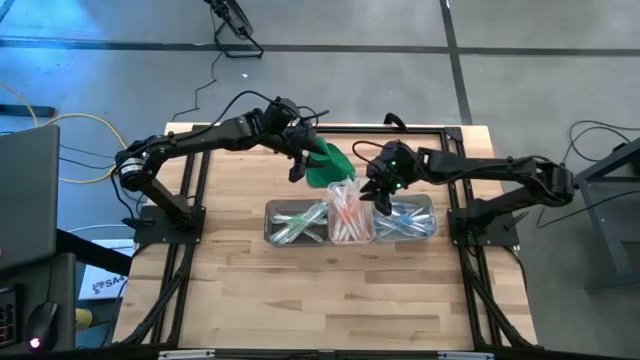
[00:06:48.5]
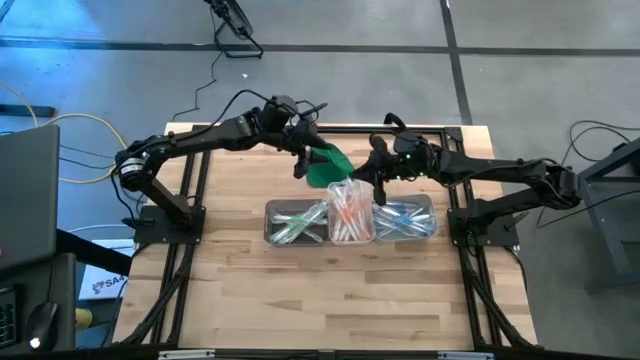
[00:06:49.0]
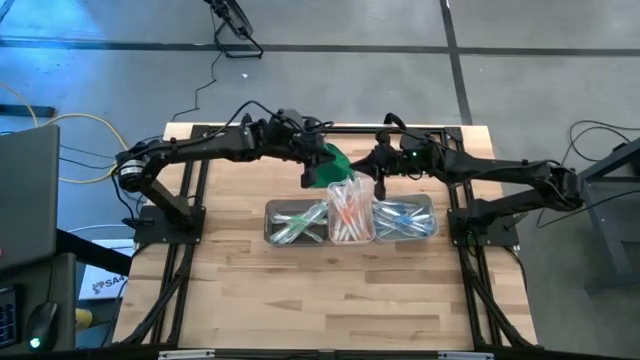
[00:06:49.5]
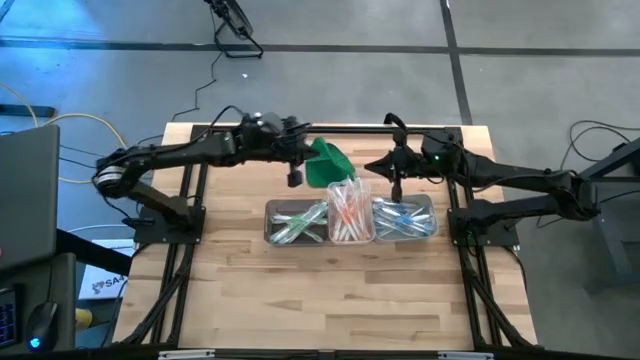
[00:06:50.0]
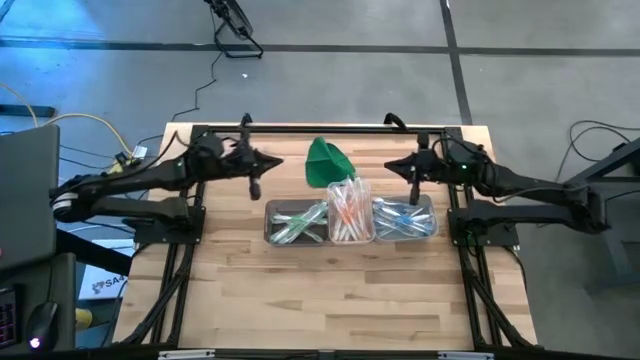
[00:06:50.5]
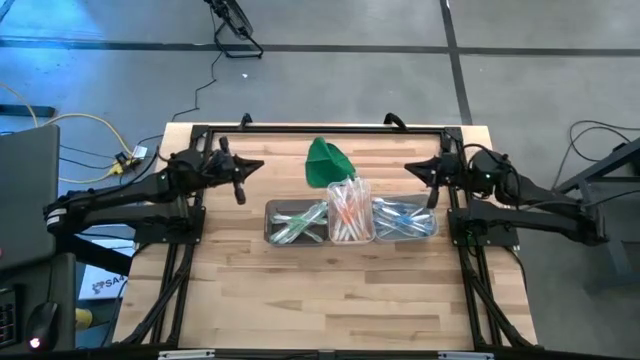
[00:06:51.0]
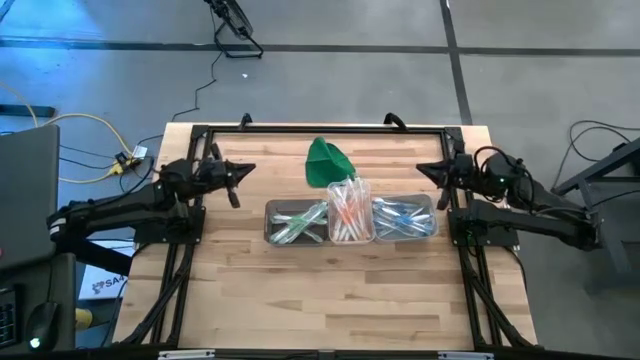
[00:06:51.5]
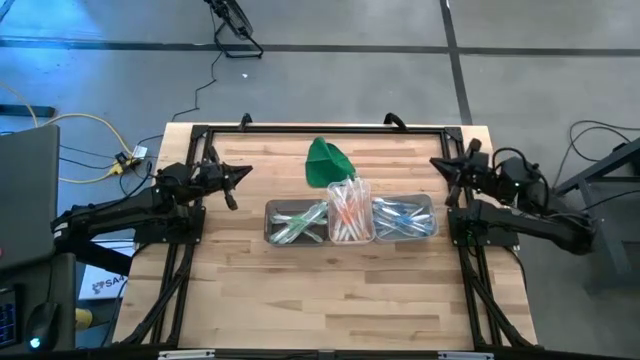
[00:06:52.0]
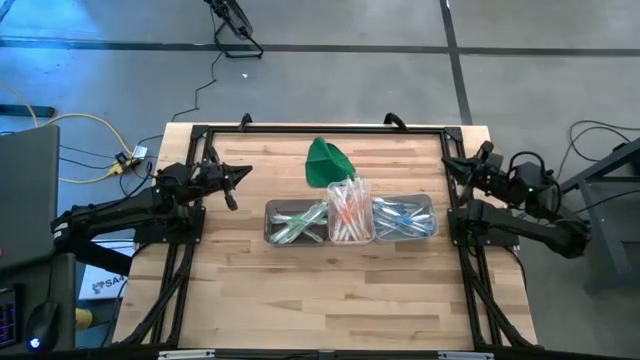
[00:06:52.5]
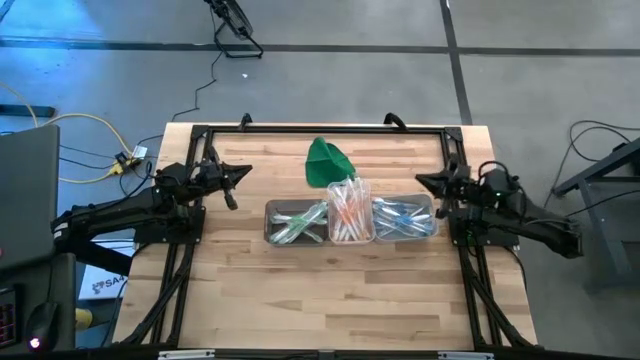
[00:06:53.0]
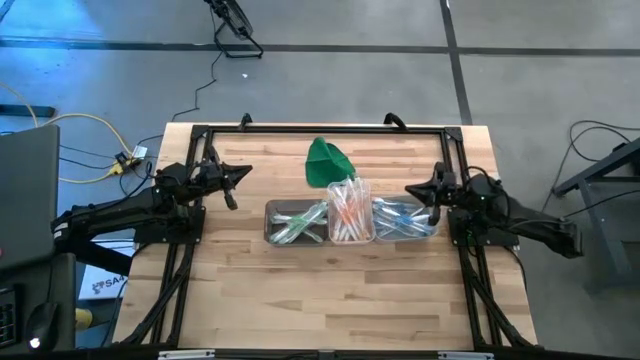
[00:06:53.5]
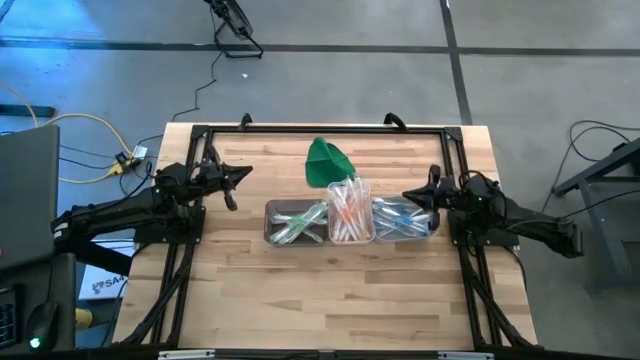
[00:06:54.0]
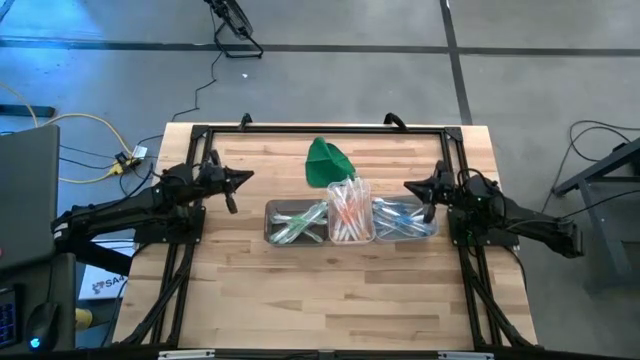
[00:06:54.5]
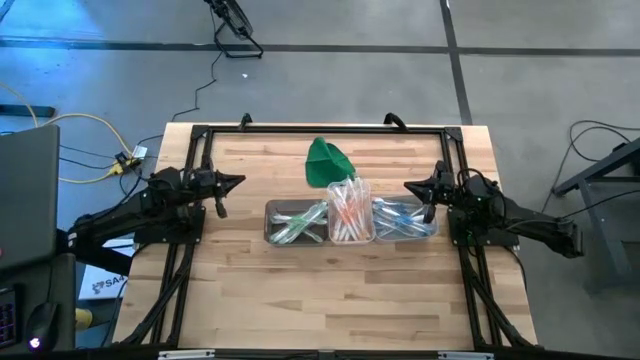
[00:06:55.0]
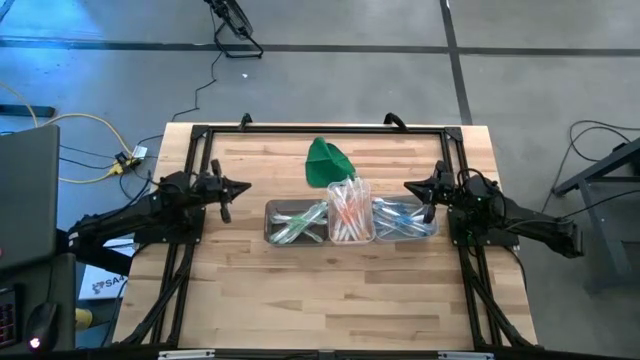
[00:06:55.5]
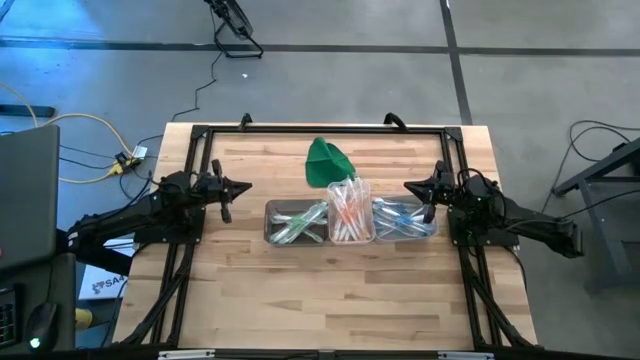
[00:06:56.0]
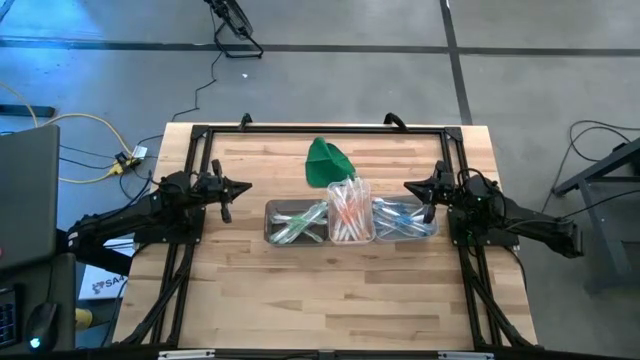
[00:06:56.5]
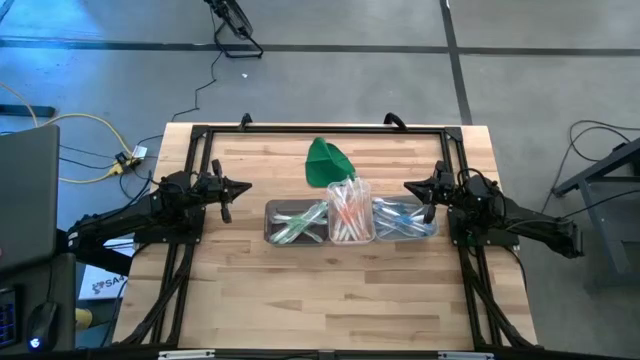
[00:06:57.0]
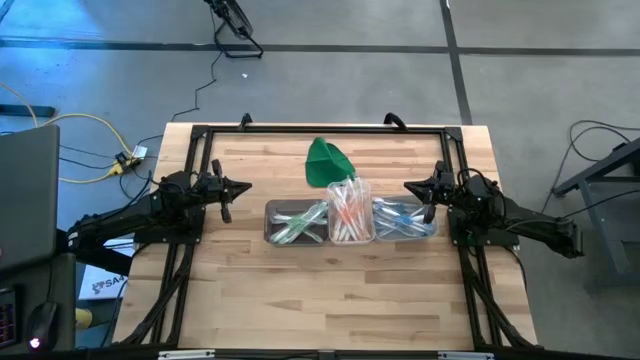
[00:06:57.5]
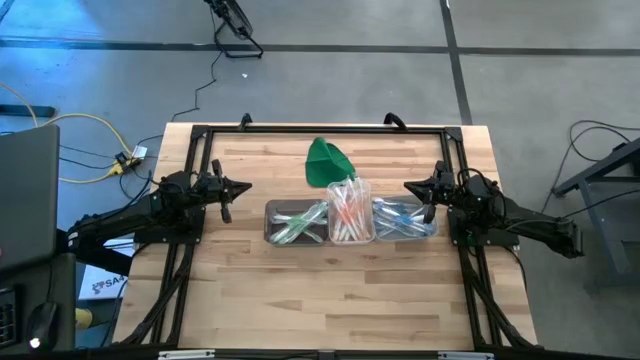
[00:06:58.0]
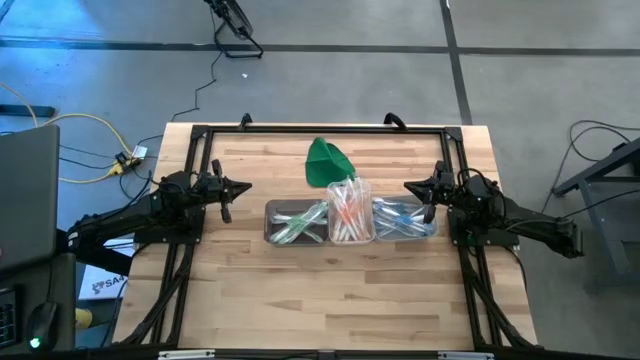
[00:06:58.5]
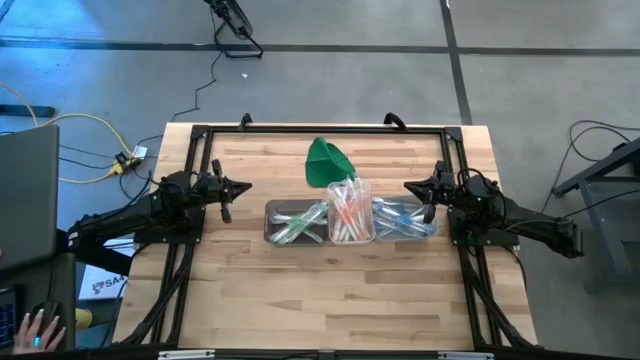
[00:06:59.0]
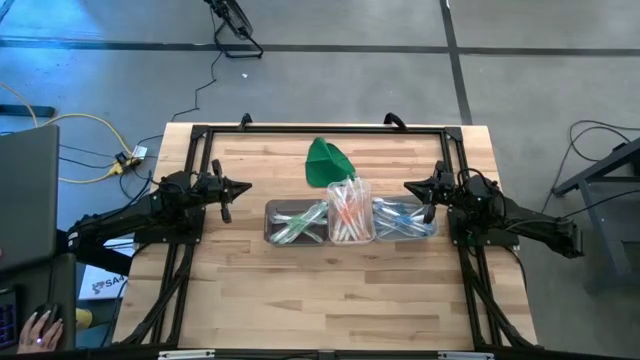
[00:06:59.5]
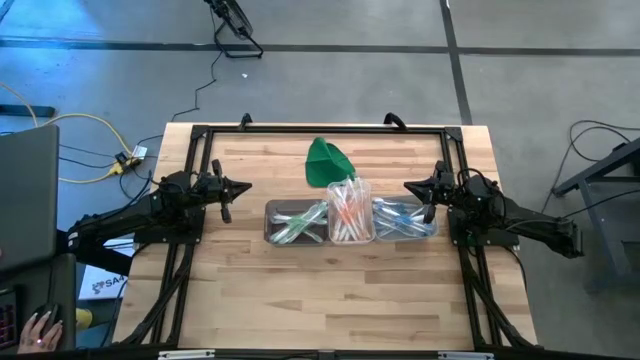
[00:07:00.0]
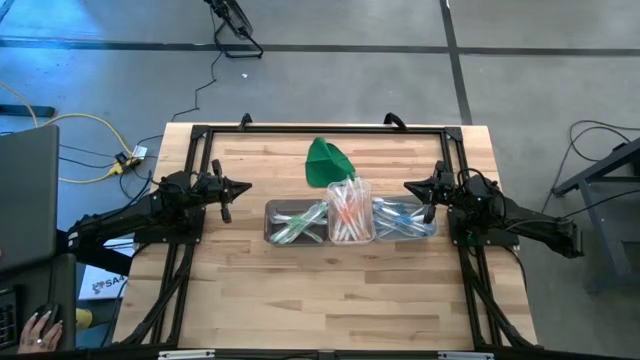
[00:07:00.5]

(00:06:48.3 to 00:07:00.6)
Task: Pick & Place Toothbrushes
Return to Home Position

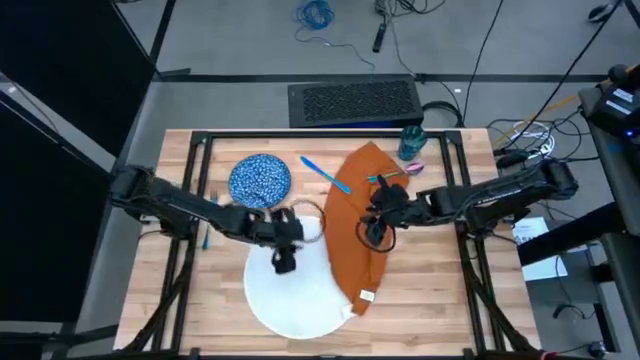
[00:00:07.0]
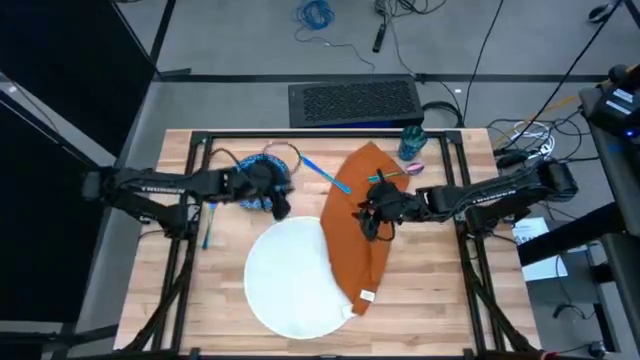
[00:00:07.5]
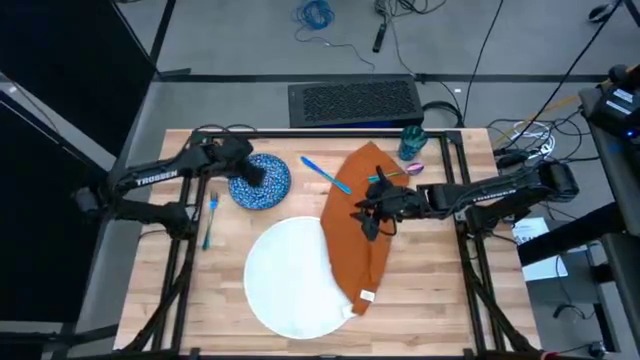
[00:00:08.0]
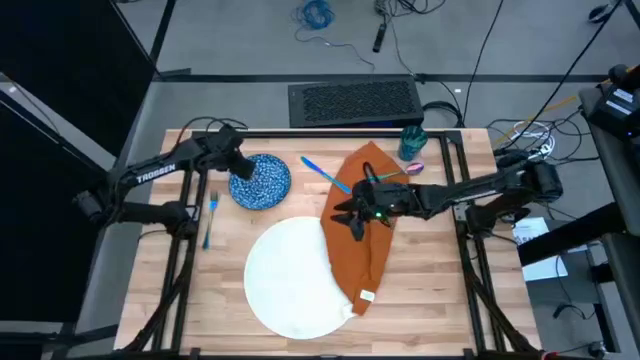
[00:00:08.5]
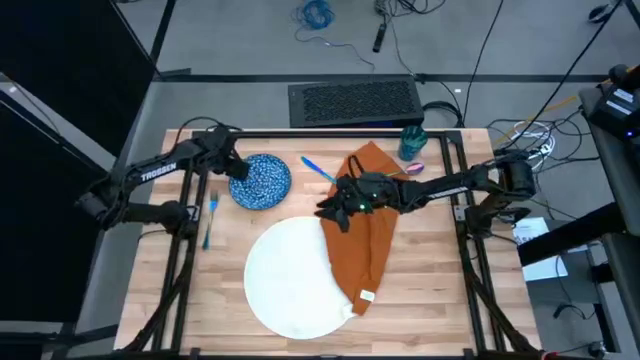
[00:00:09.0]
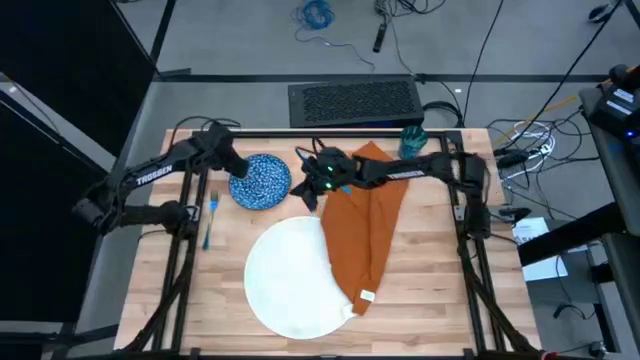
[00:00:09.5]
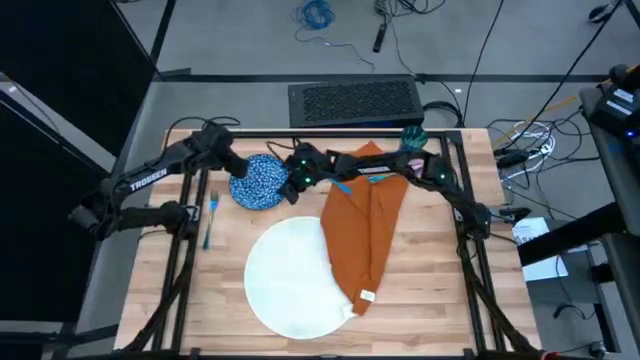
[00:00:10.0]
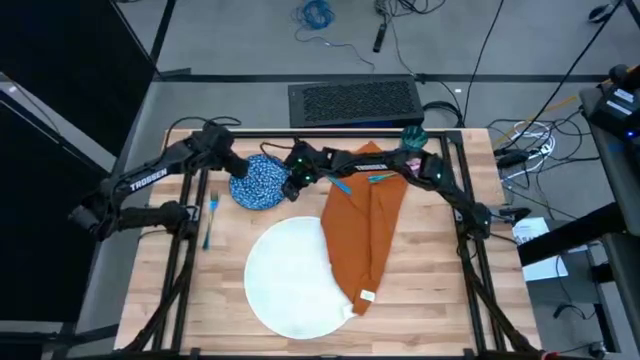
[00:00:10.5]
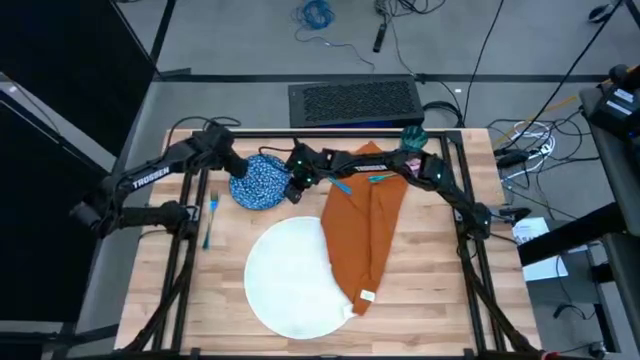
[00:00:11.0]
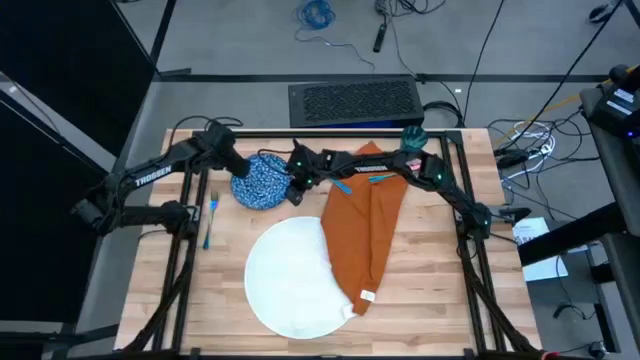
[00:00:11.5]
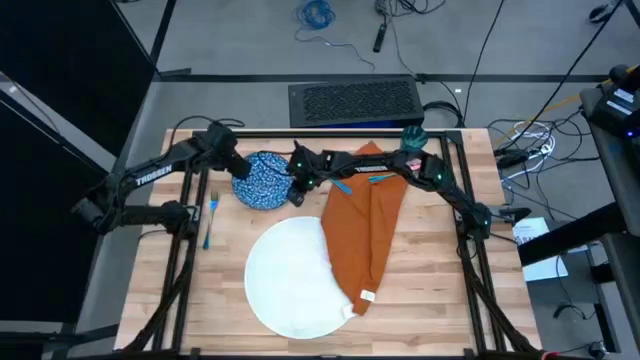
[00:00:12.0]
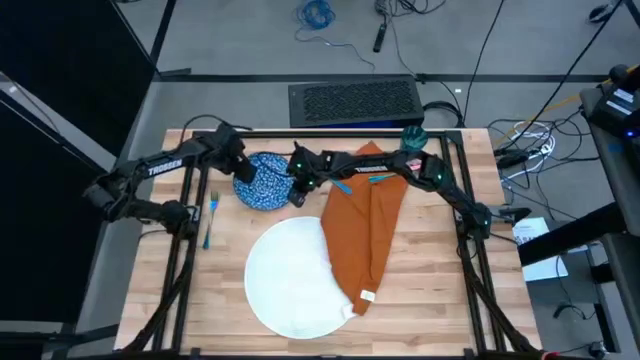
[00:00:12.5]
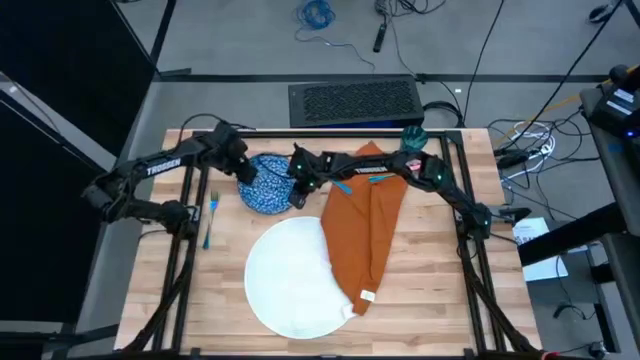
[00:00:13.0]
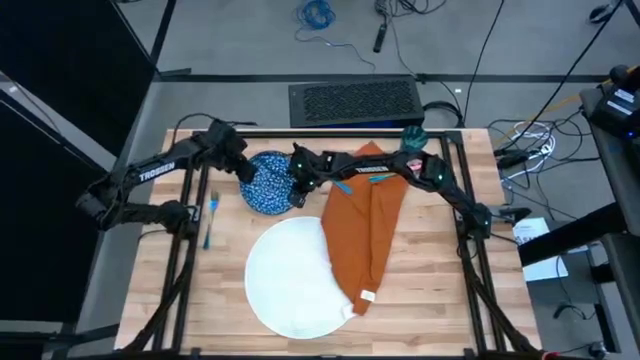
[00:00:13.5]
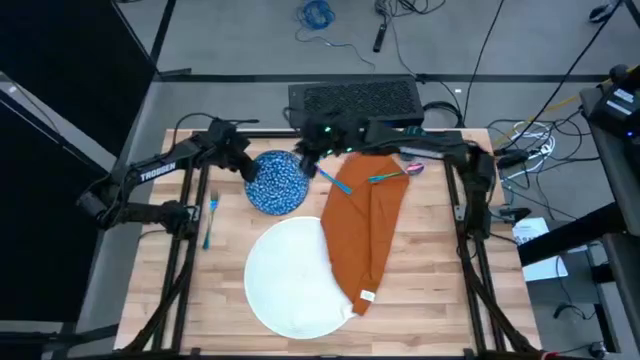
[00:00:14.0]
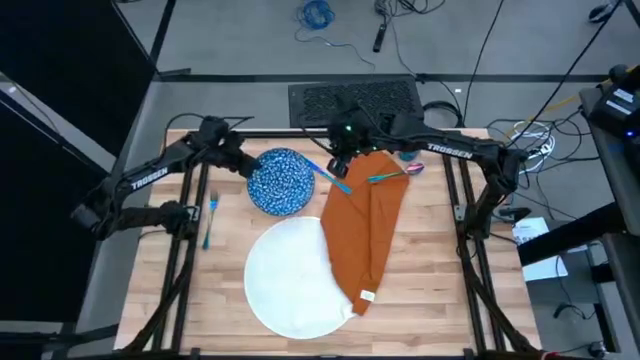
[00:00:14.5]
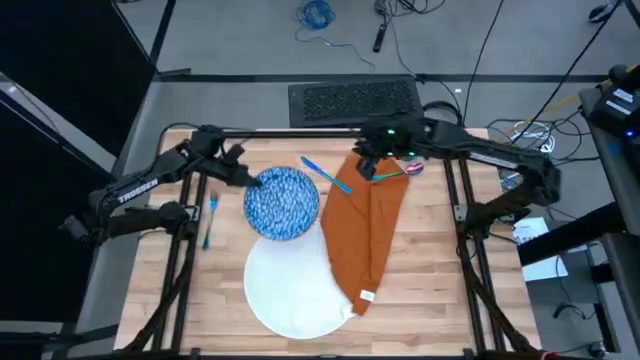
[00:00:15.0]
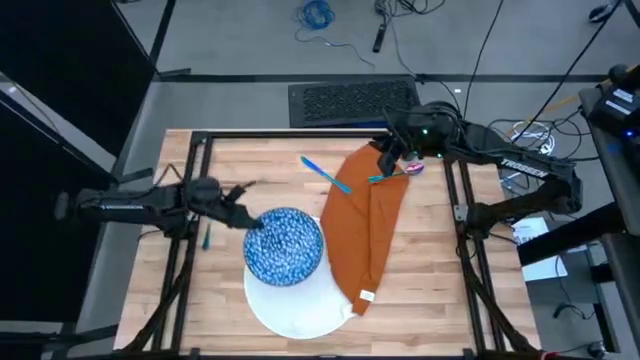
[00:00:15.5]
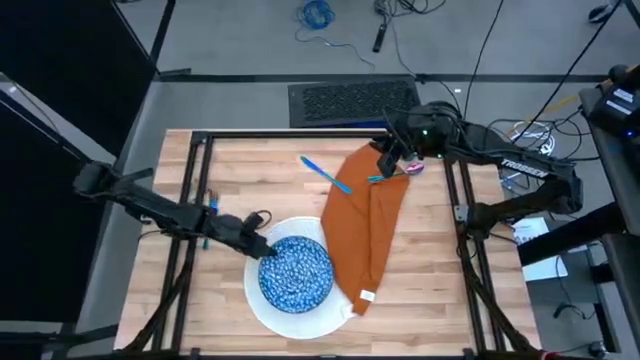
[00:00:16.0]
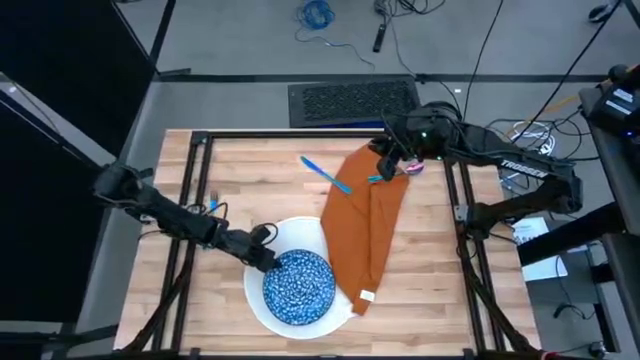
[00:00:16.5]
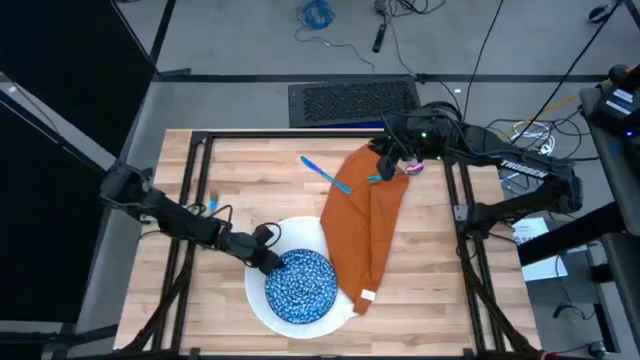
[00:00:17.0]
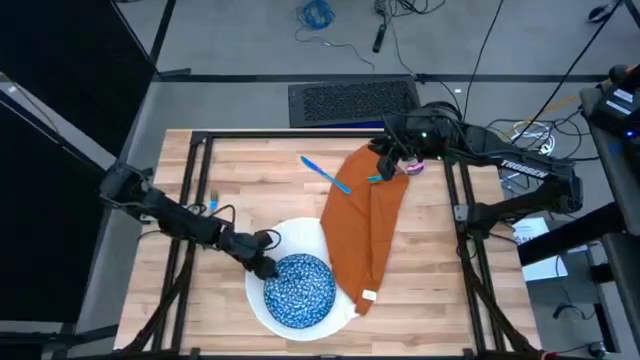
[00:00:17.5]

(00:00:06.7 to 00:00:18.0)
Task: Set table place
Put the blue plate on the white table mat
